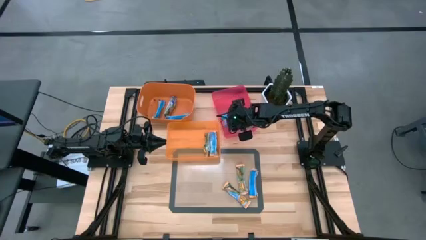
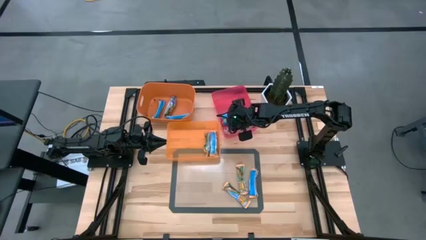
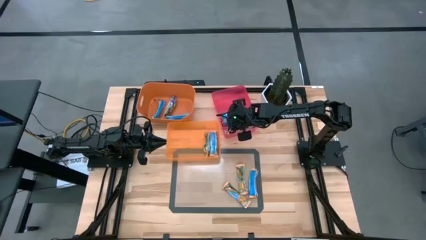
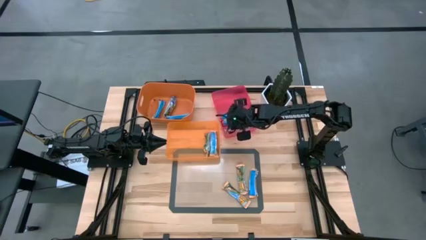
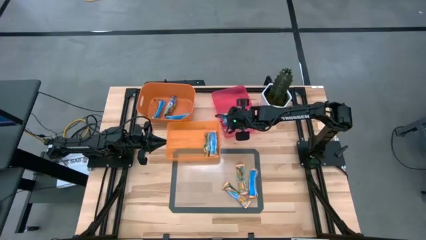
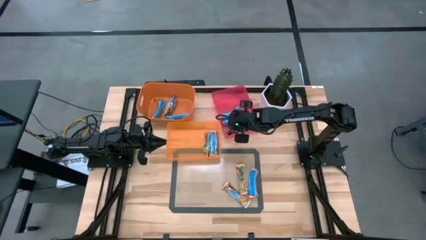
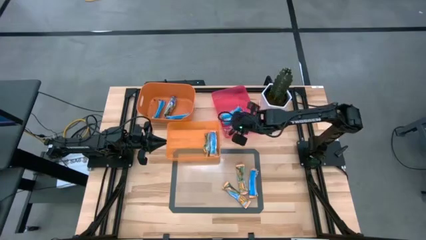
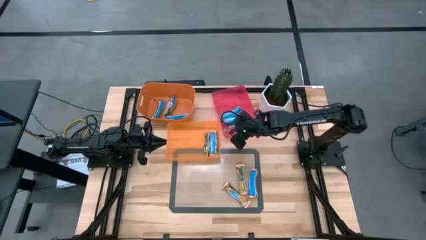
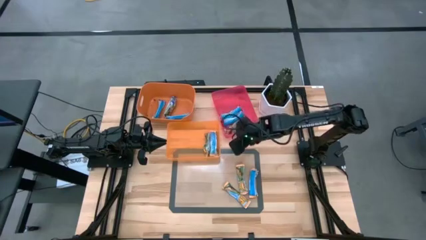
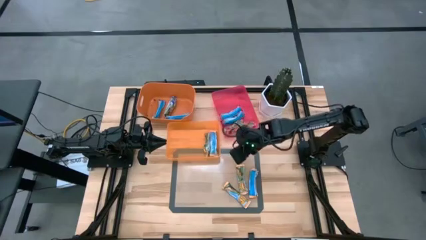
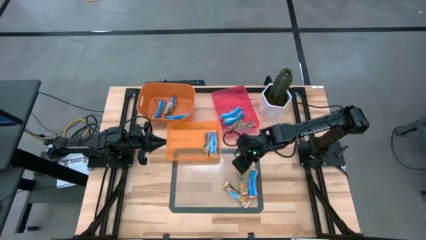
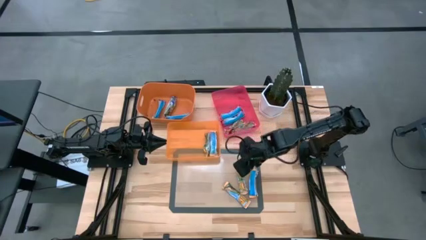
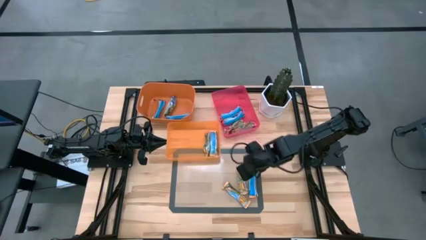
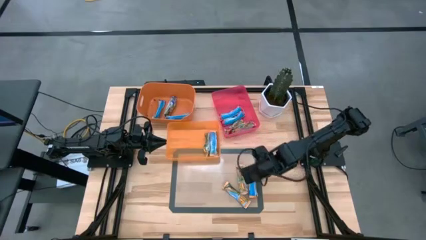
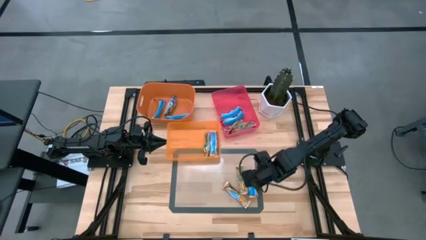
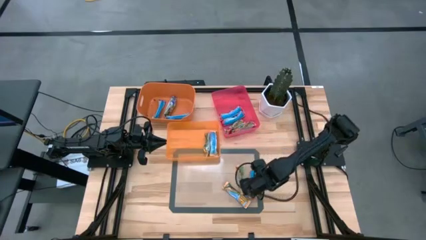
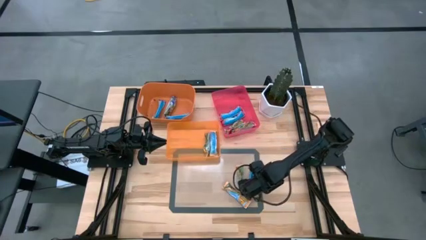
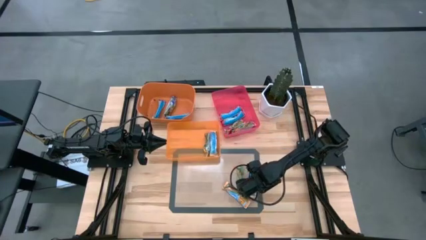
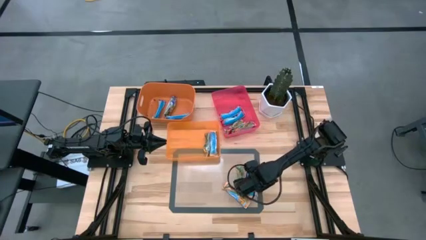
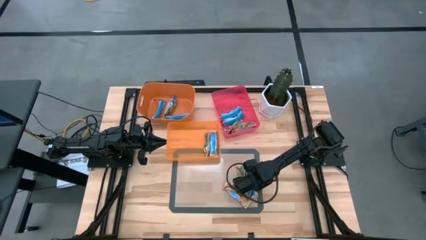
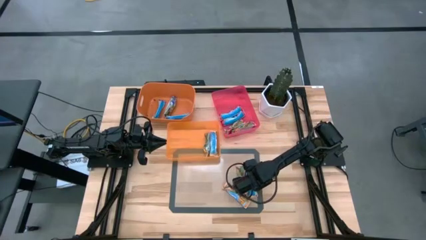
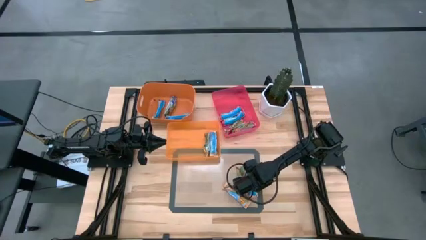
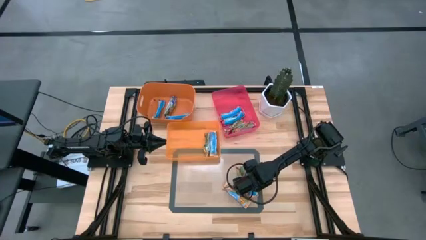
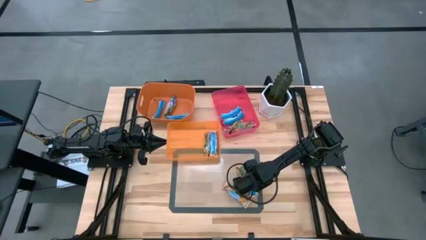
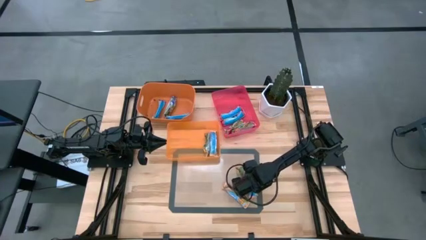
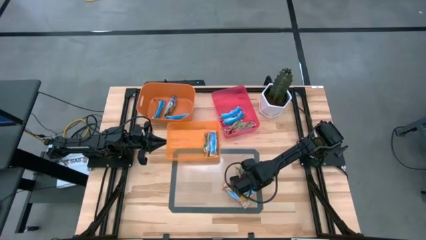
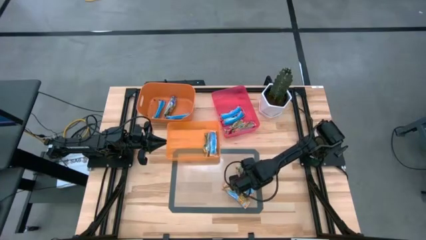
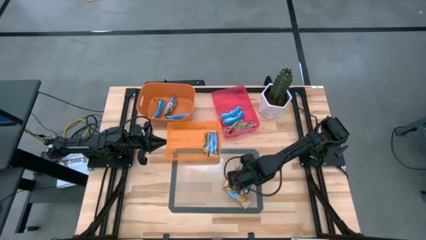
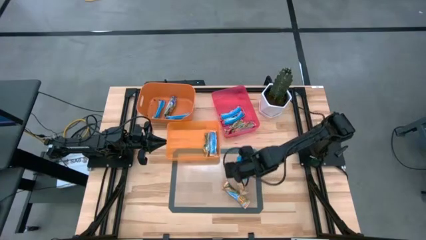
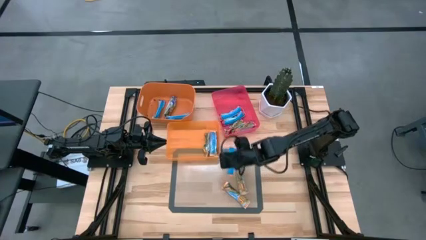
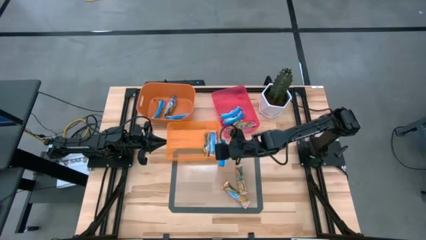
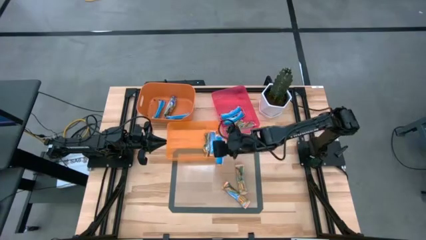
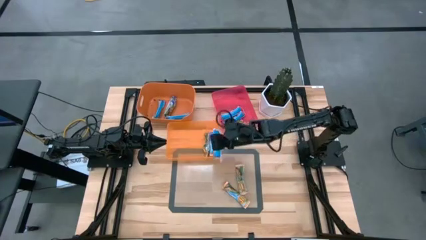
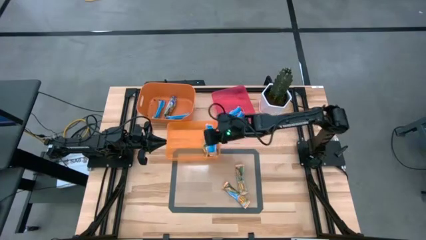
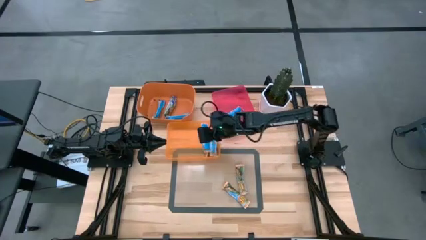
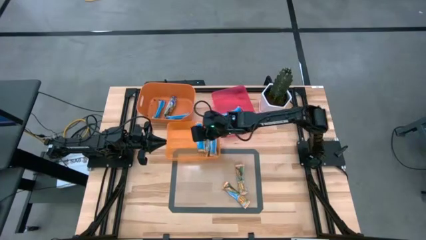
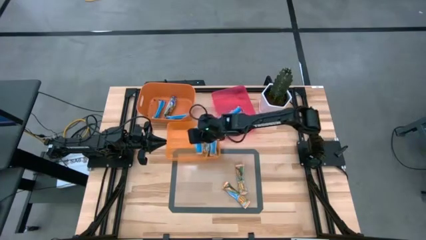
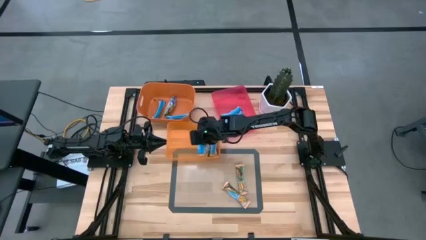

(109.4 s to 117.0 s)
Task: Pick and place Granola Bars by type
Put the yellow granola bar into the bottom orange bin

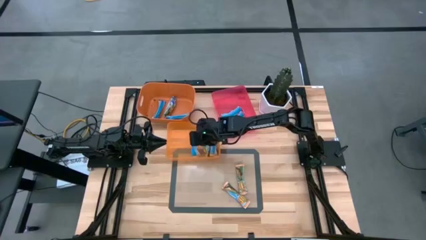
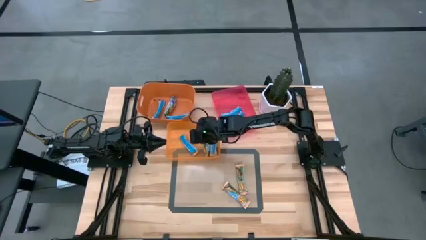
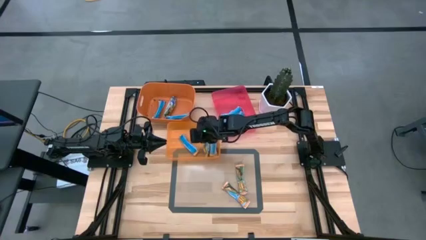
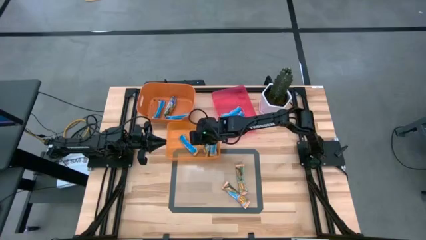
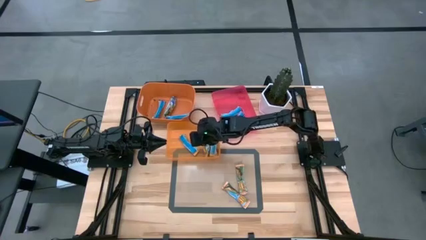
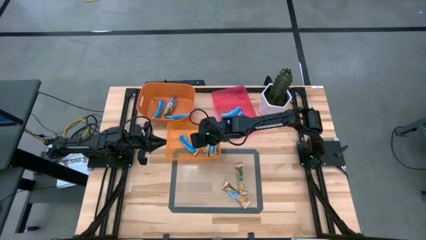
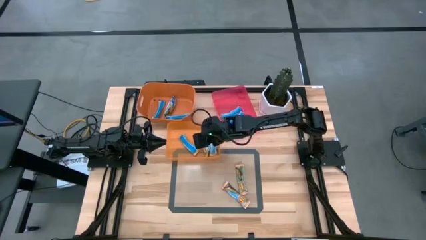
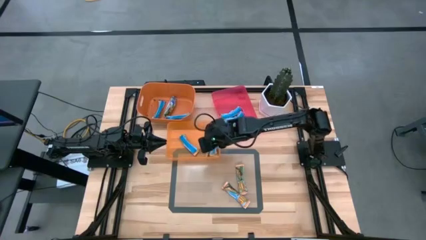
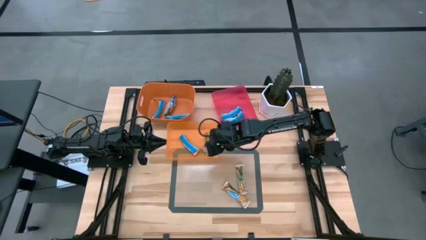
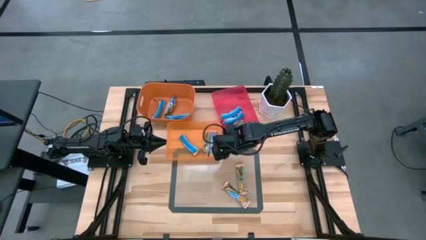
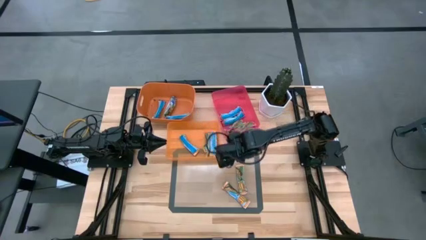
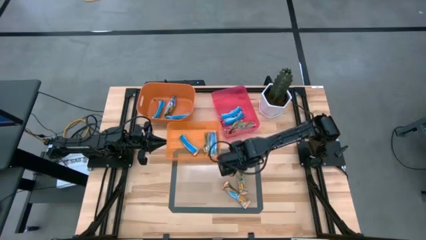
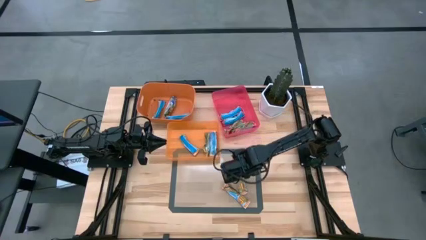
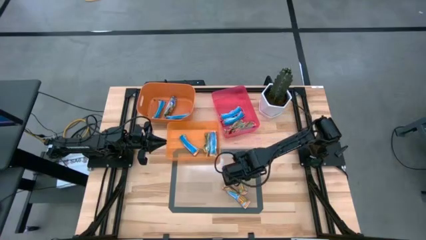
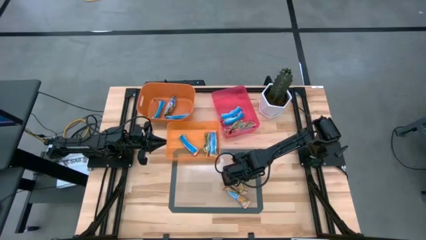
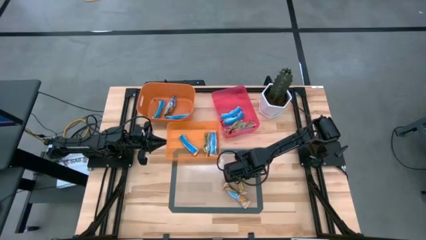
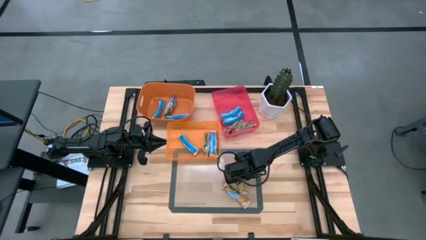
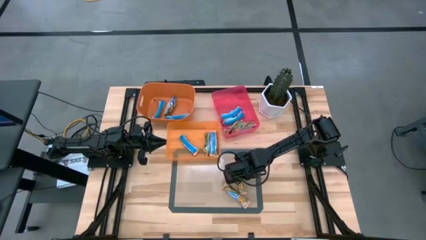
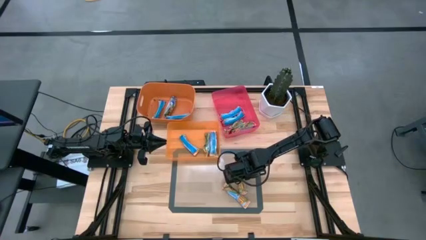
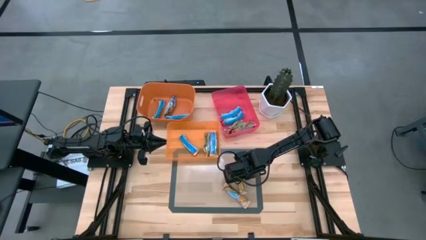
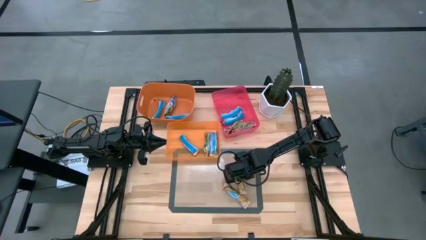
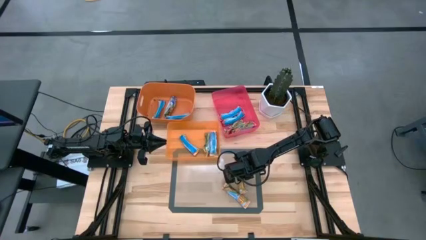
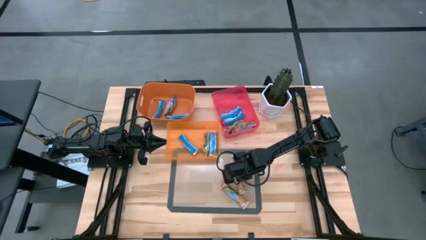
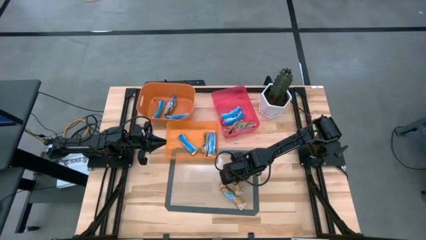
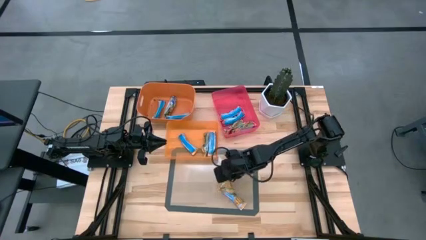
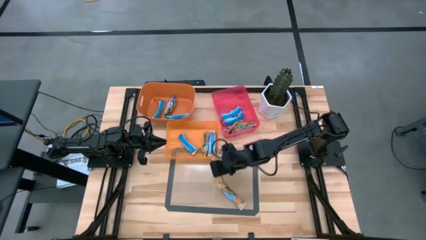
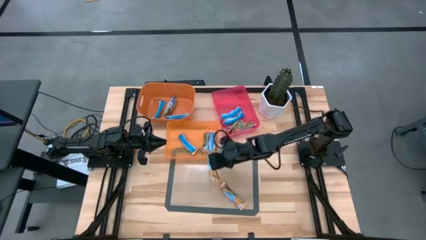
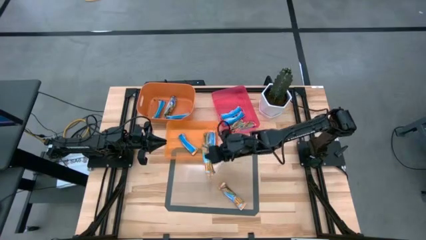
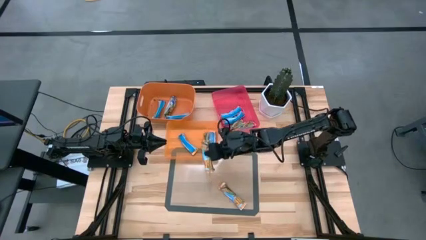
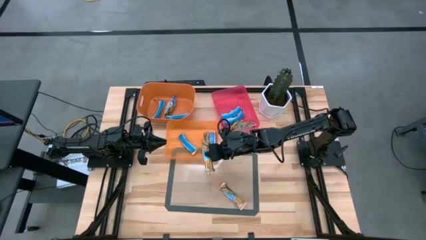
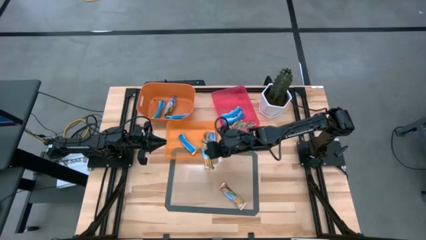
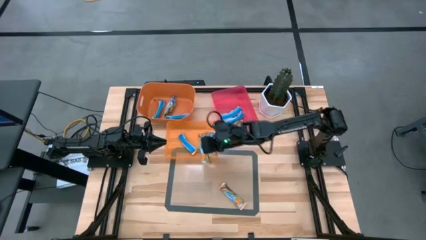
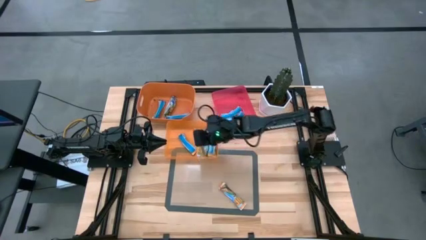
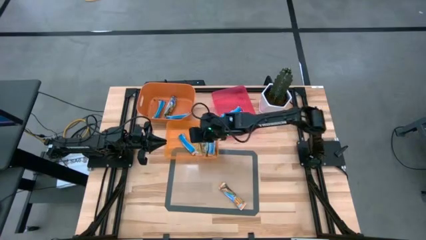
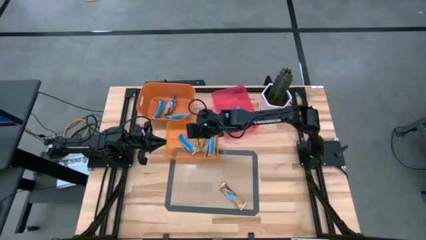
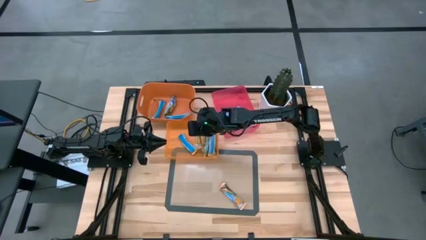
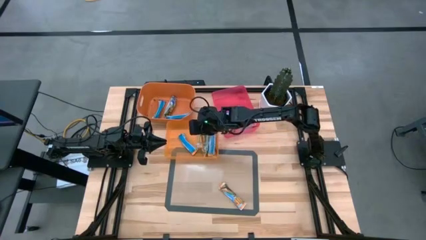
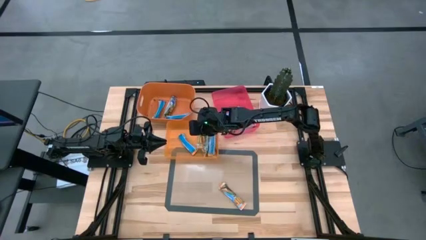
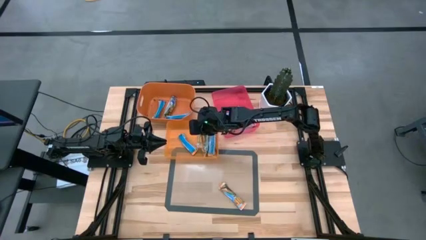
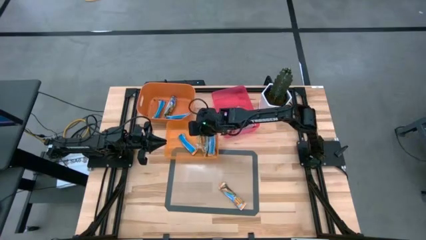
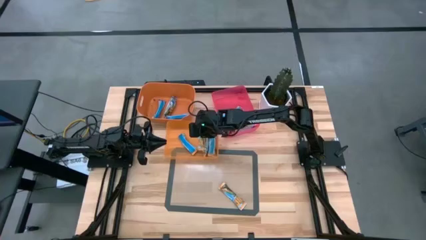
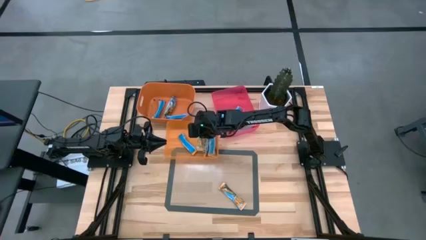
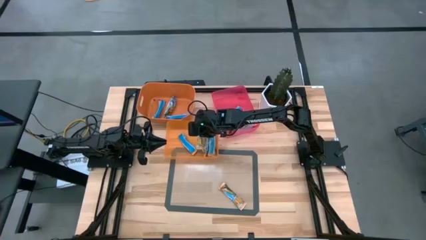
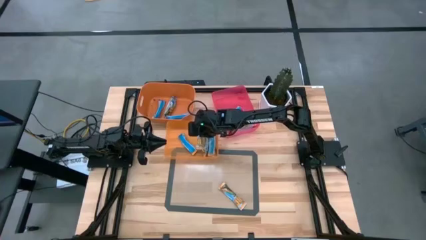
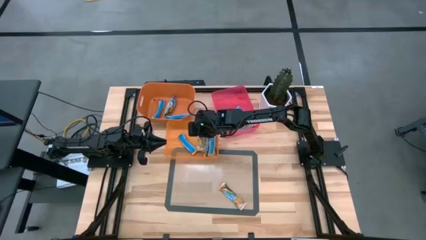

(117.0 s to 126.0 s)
Put the yellow granola bar into the bottom orange bin
